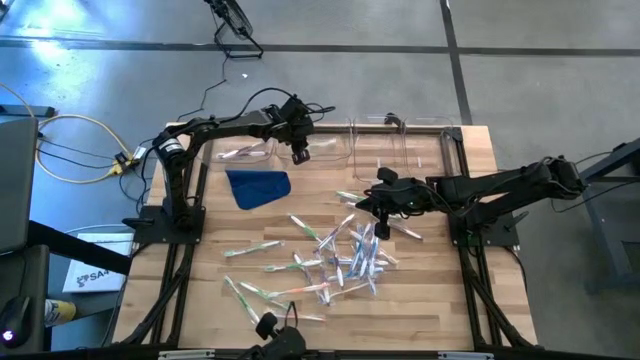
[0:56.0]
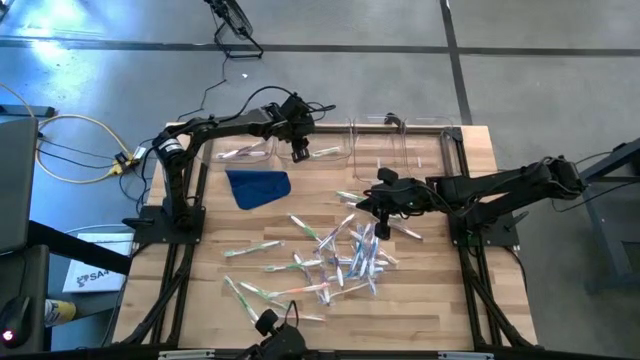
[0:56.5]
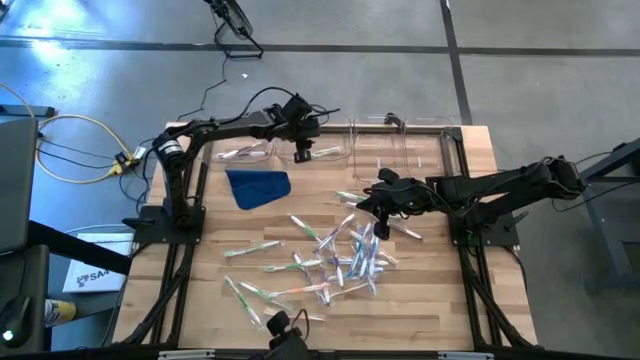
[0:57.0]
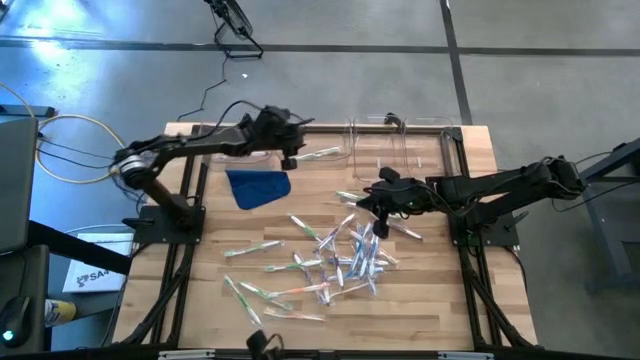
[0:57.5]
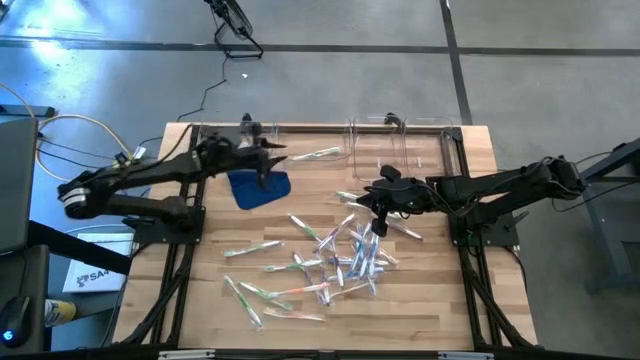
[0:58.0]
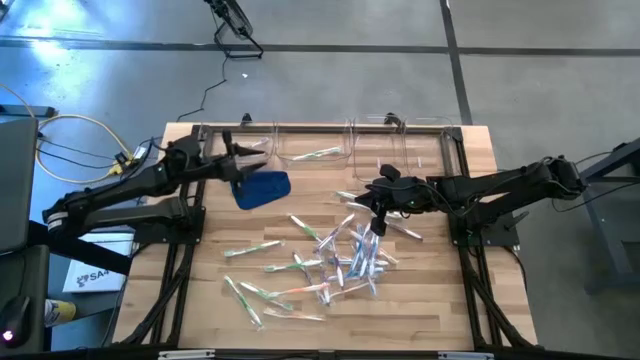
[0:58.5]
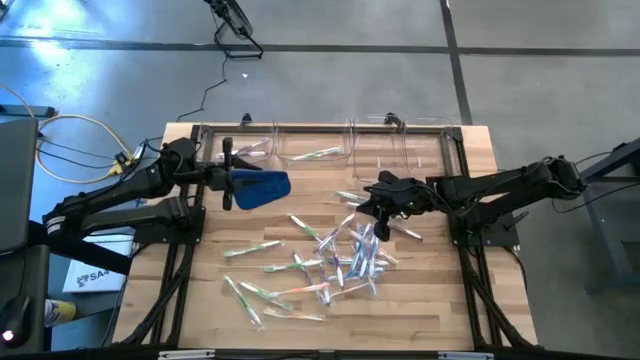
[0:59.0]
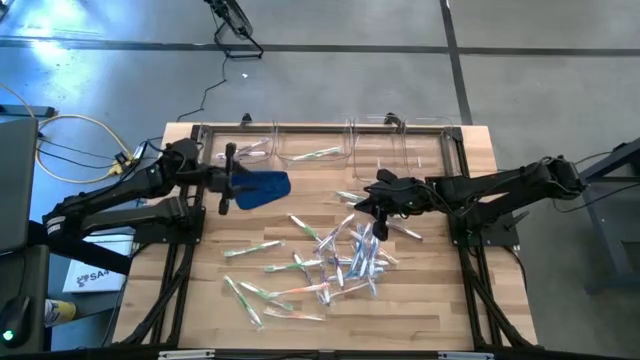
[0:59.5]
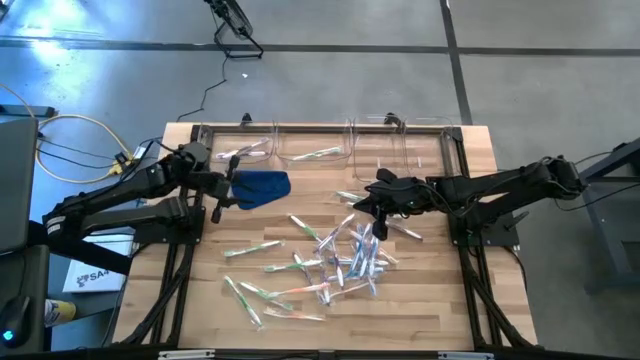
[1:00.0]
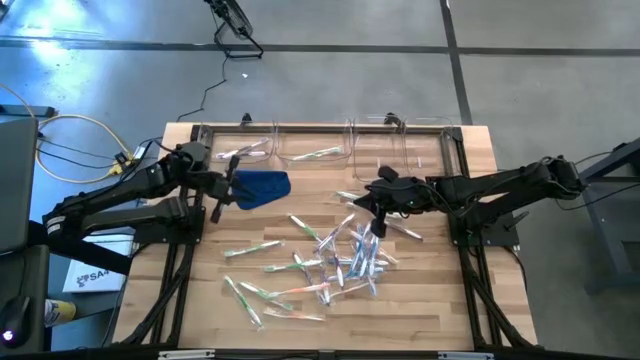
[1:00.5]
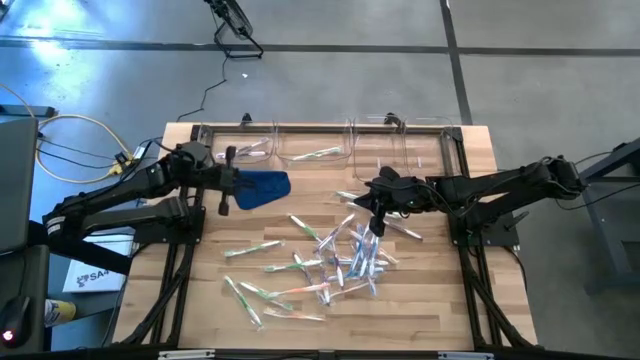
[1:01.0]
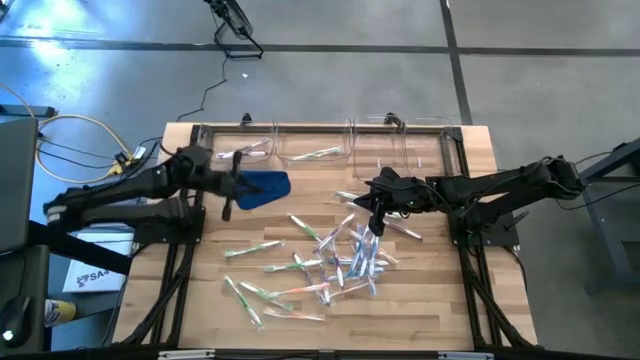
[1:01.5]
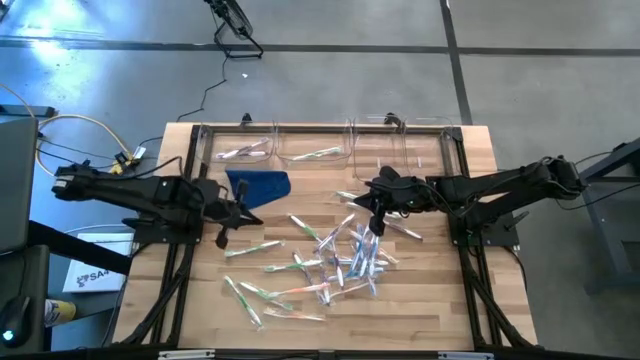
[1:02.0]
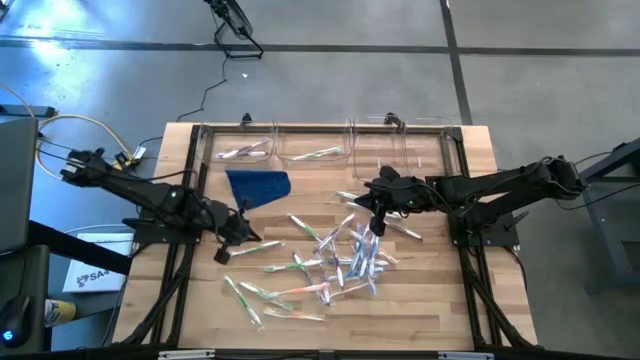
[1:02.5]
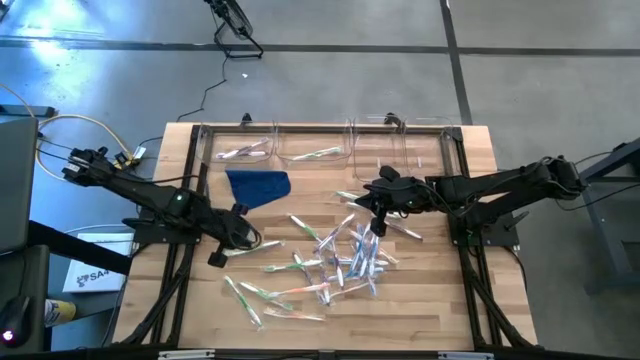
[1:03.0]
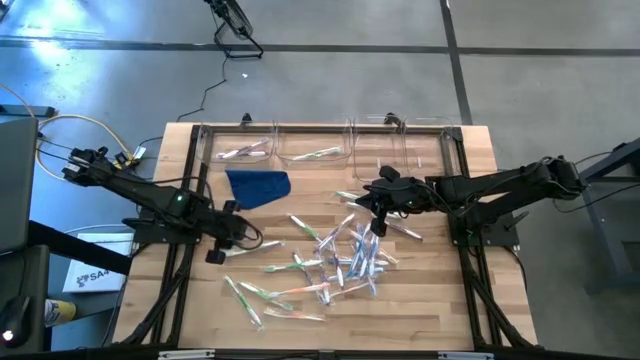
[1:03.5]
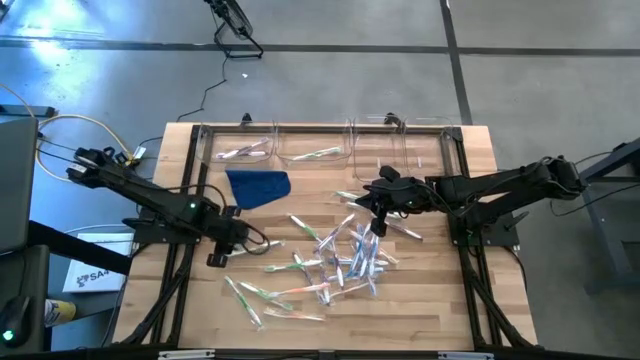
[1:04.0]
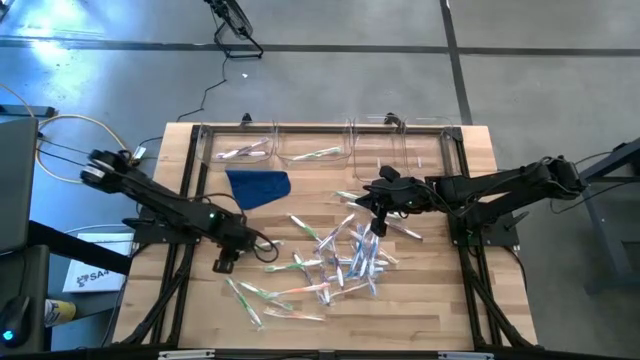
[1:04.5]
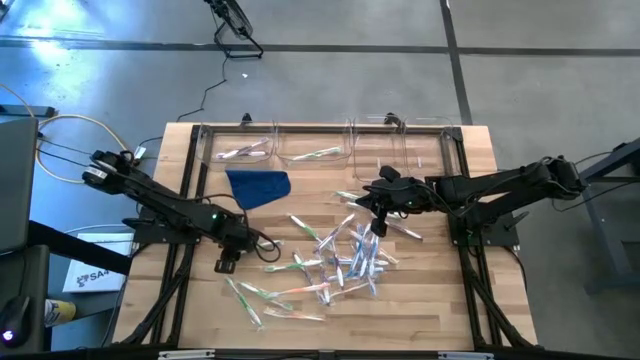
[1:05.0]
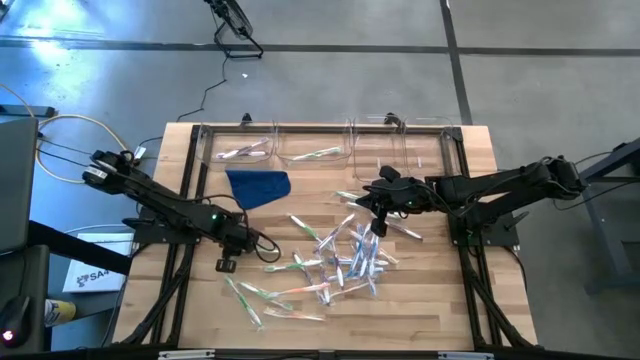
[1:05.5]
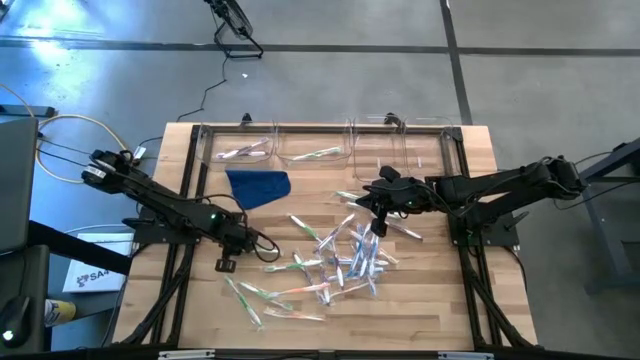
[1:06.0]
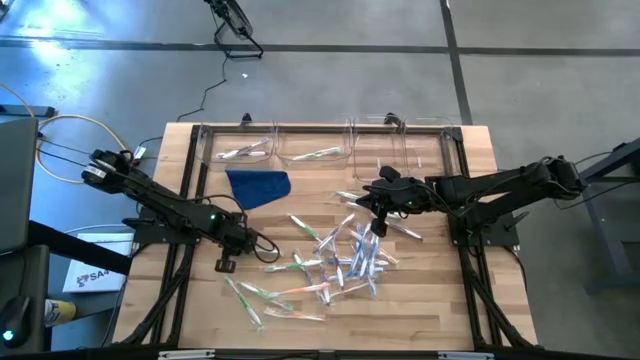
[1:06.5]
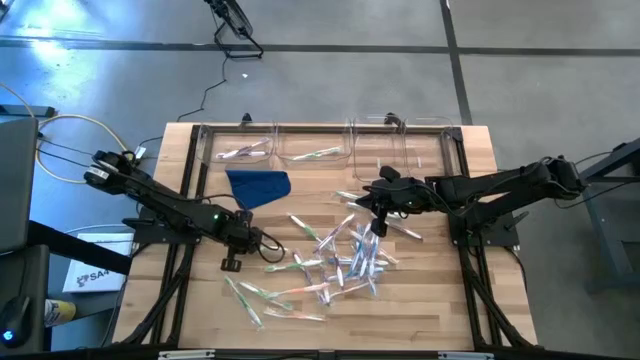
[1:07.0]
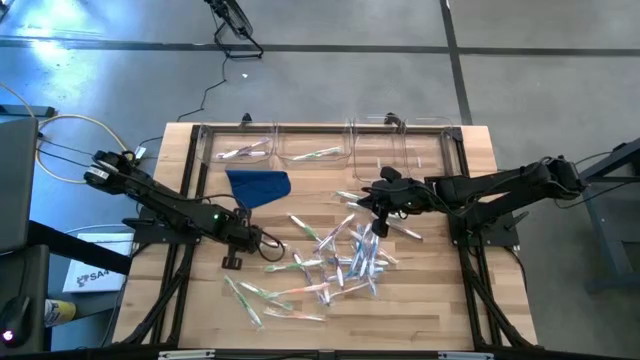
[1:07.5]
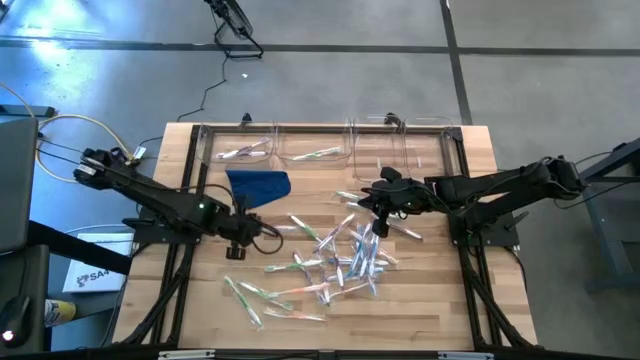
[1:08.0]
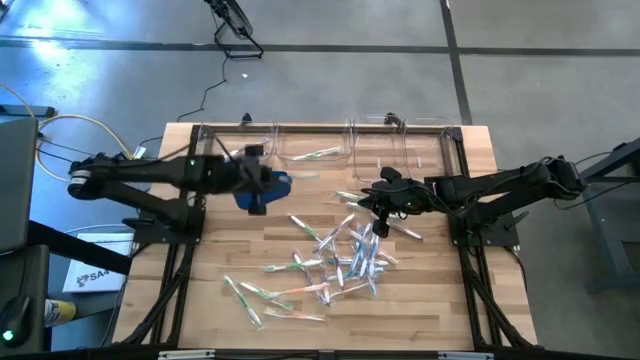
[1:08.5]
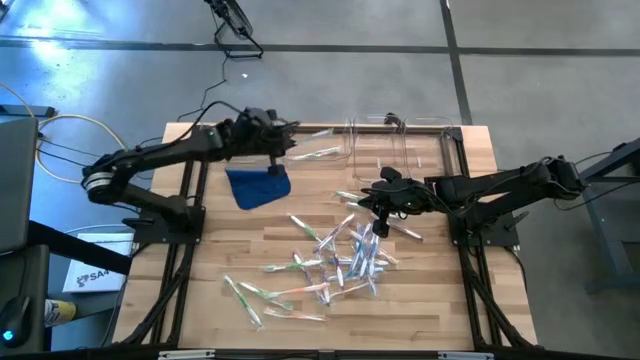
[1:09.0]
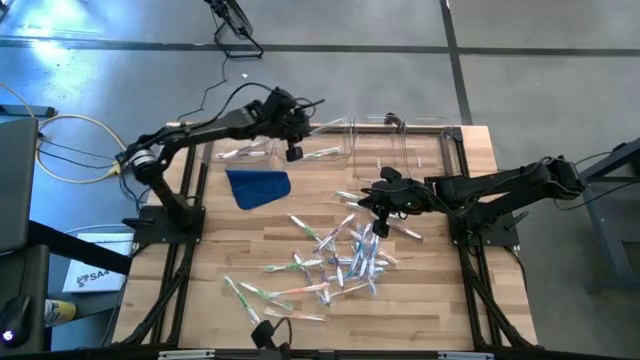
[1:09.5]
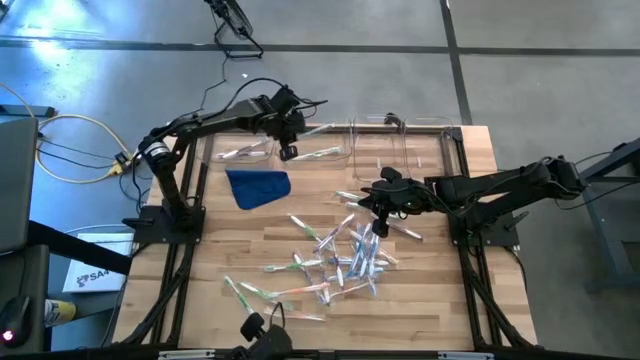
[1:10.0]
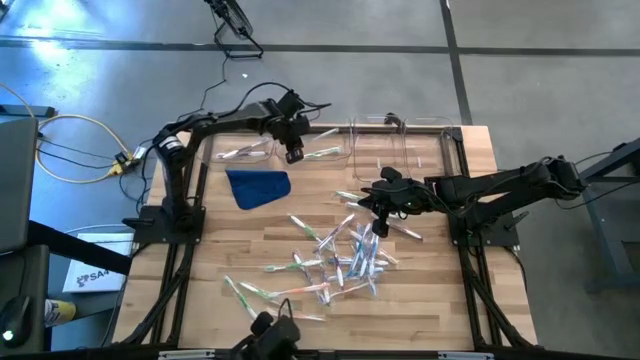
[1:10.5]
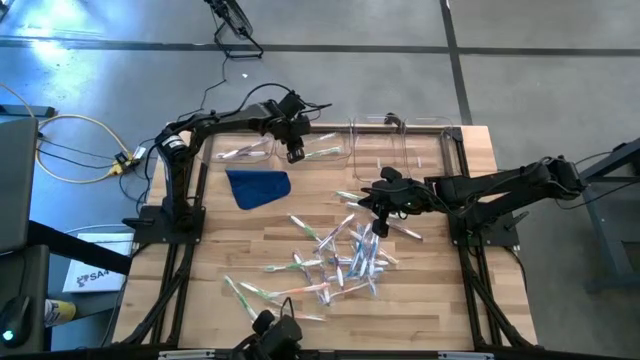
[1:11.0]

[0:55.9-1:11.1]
Task: Pick & Place Toothbrushes
Put the green toothbrush into the middle left transparent bin

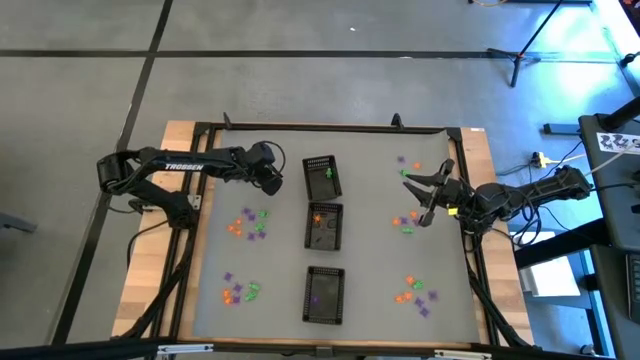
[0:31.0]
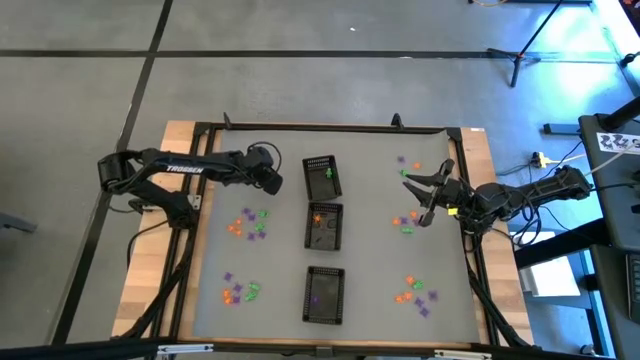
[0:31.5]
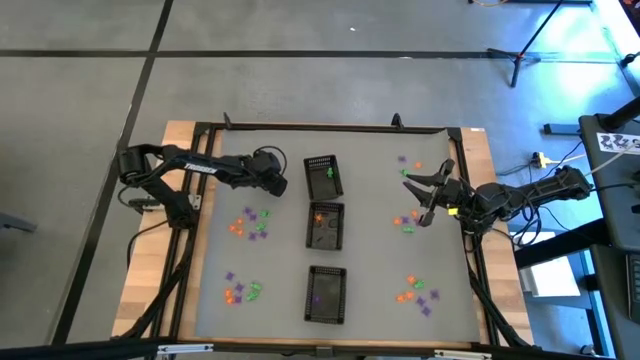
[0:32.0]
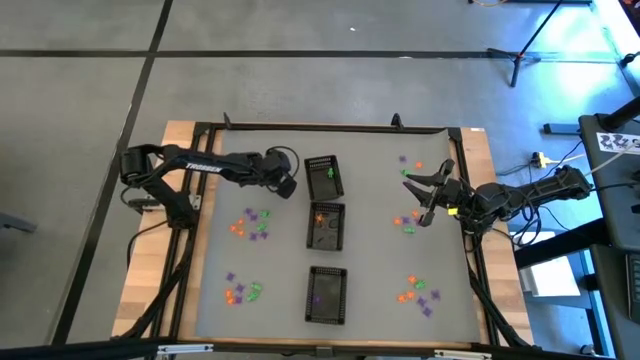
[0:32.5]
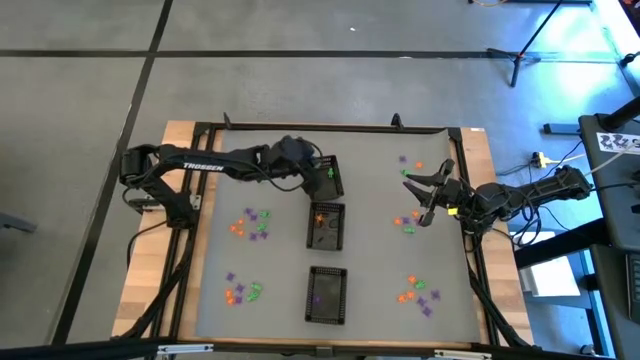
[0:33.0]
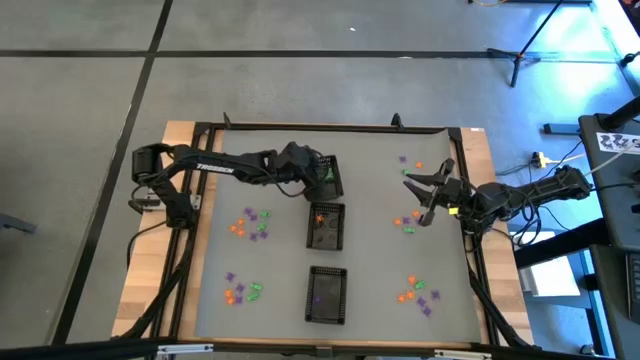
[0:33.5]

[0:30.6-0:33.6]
Task: Sort Halloween decoration
Put the green skeleton toy into the top black bin

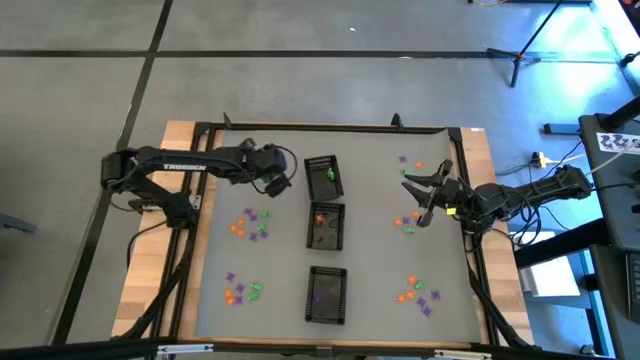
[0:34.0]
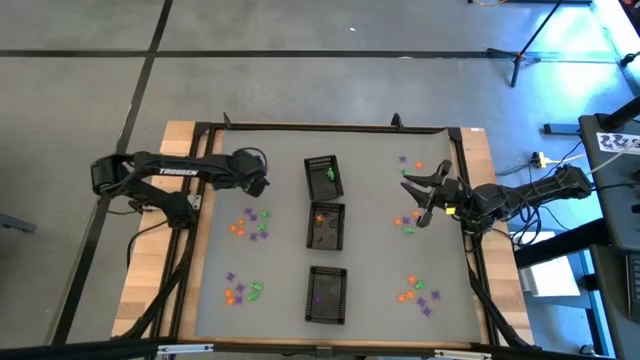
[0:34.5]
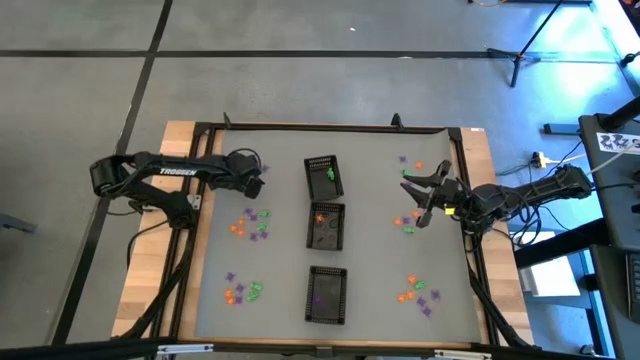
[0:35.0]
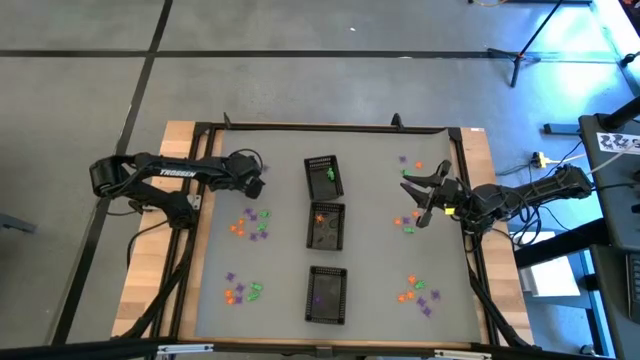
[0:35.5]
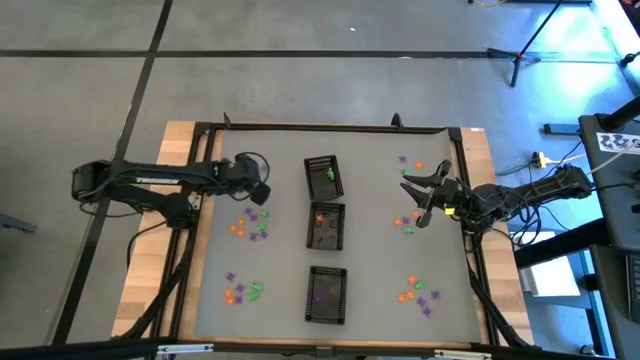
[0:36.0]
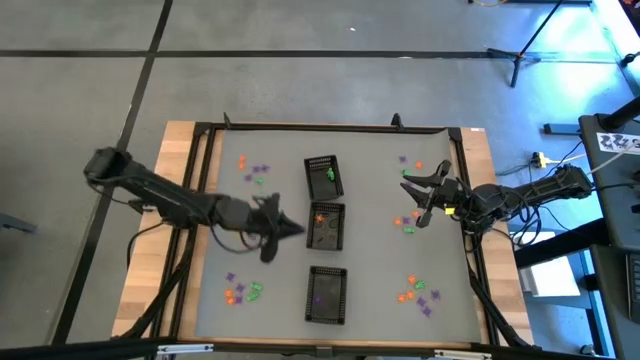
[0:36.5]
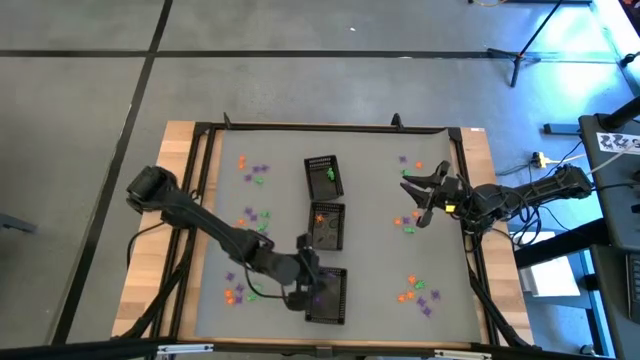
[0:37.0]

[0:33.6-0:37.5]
Put the violet spider toy into the bottom black bin
